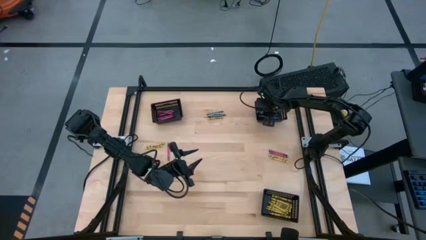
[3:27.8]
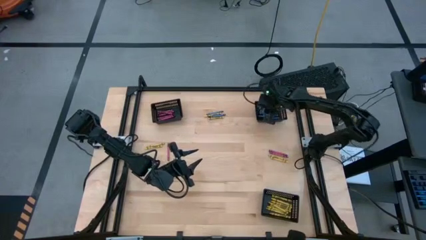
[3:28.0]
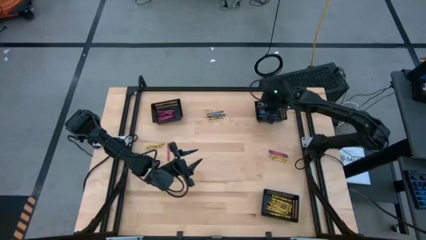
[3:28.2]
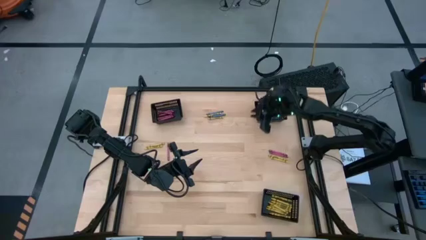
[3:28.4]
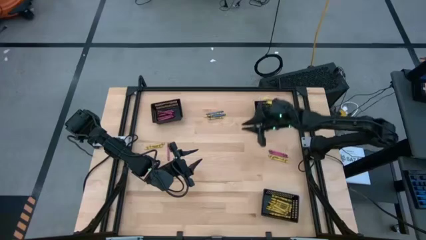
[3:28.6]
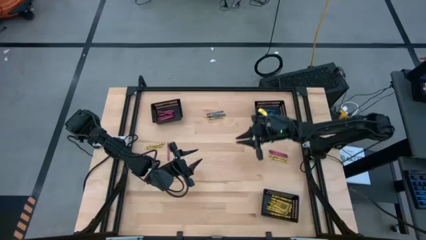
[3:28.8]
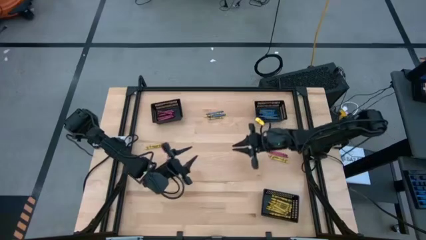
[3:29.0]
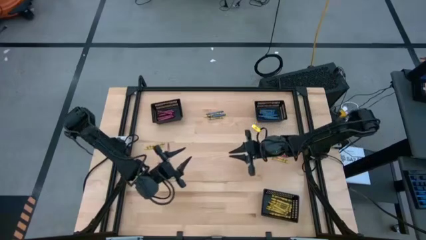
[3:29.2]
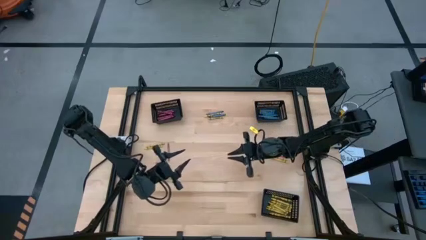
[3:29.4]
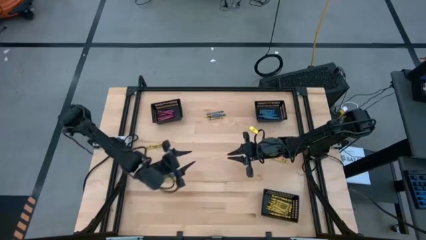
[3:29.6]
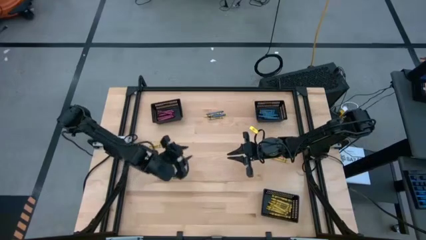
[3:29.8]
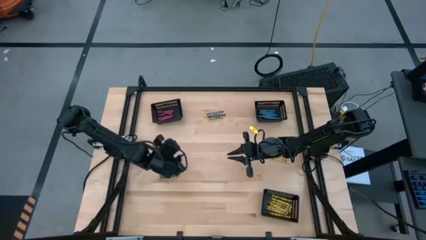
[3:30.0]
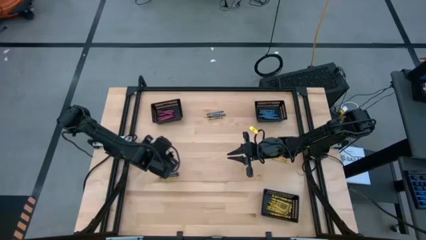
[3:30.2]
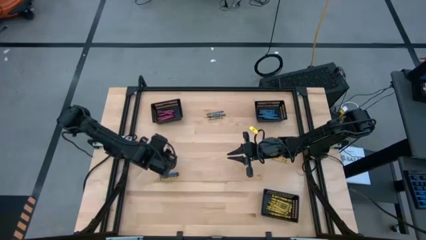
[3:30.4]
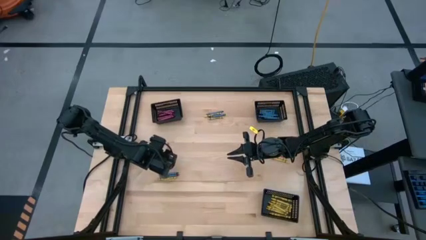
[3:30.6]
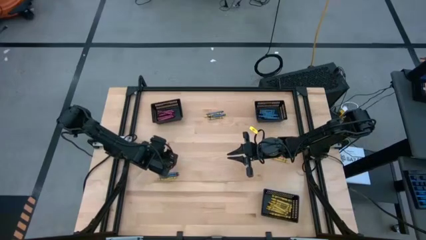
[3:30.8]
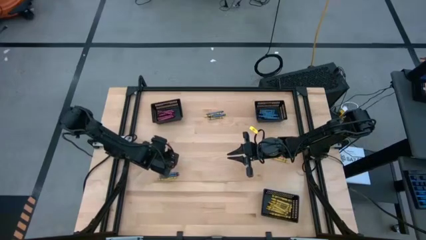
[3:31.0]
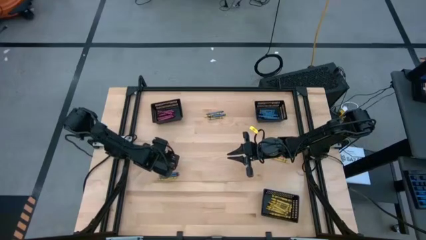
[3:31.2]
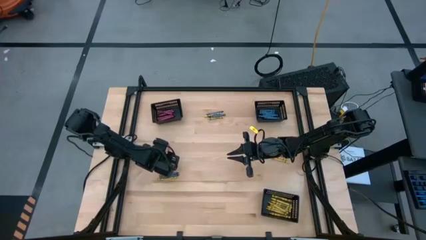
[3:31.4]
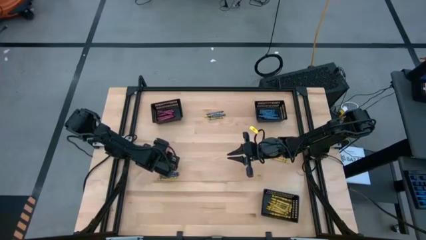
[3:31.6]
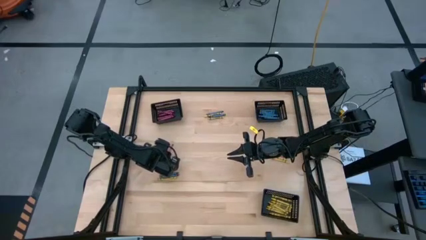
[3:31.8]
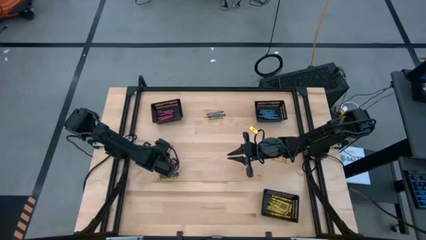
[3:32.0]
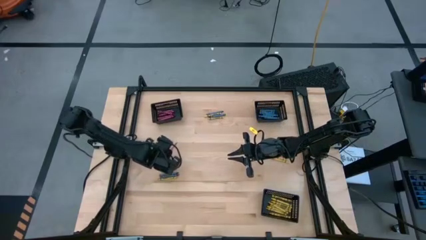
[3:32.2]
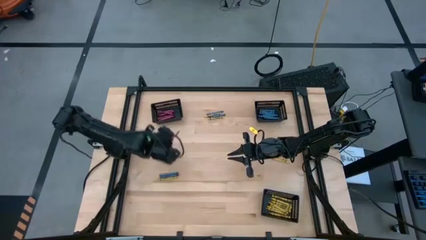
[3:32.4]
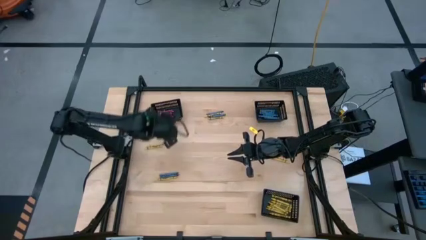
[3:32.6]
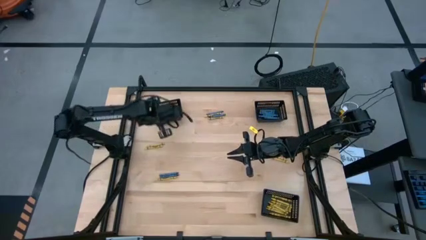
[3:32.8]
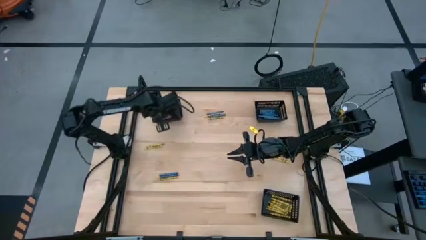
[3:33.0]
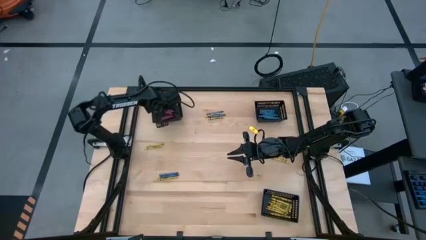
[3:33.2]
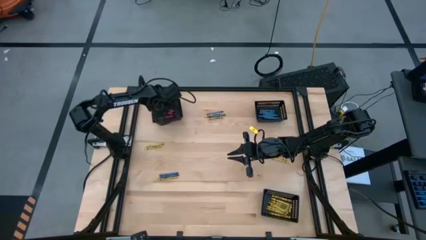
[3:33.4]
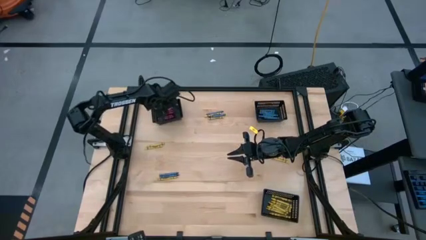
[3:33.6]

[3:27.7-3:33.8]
Task: Sort crayons
Put the red crayon into the top left black bin

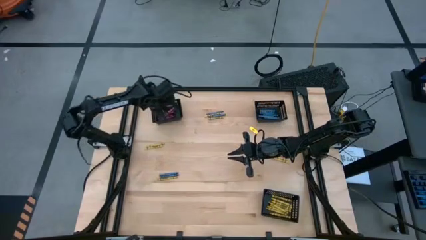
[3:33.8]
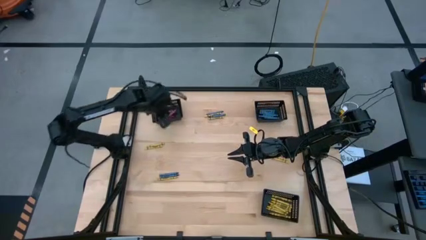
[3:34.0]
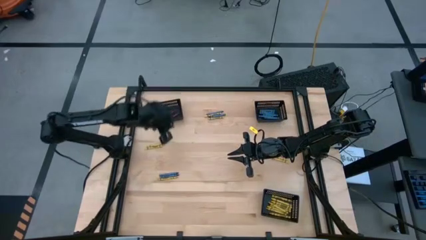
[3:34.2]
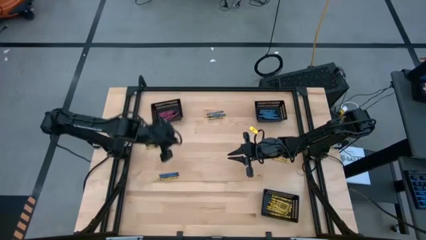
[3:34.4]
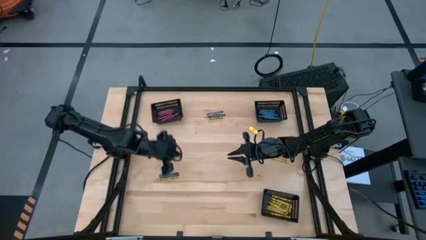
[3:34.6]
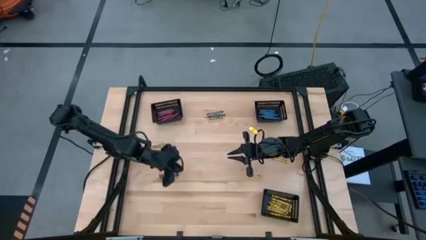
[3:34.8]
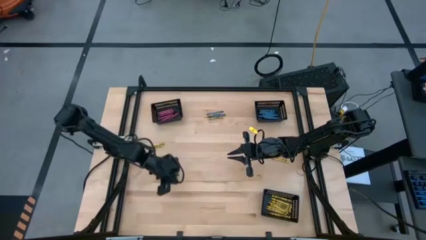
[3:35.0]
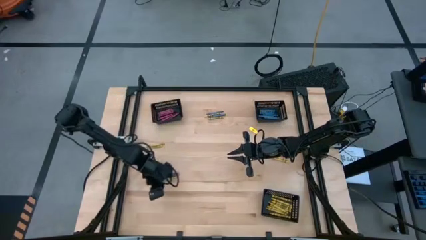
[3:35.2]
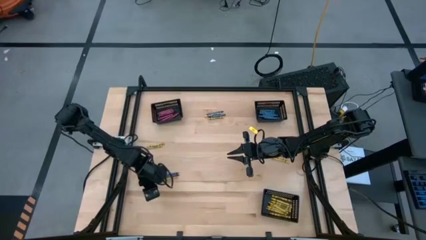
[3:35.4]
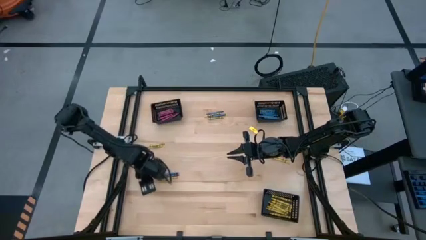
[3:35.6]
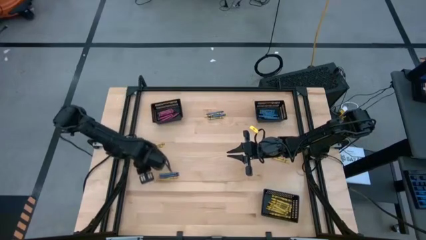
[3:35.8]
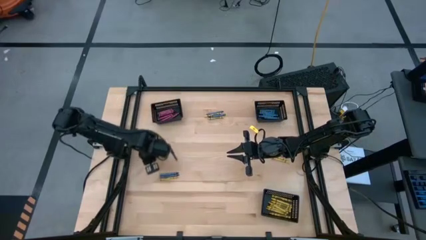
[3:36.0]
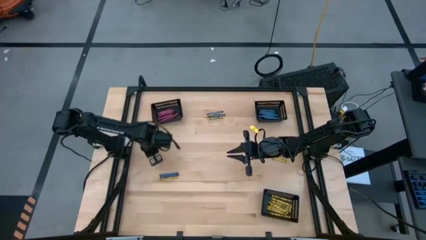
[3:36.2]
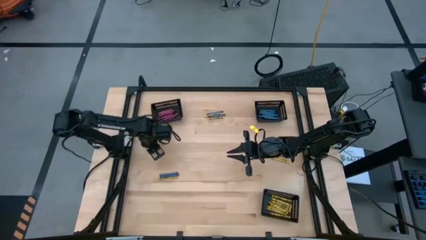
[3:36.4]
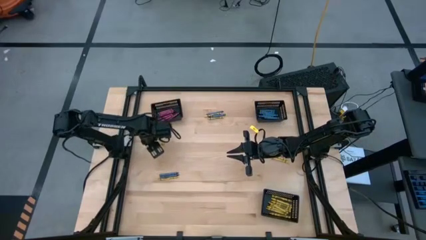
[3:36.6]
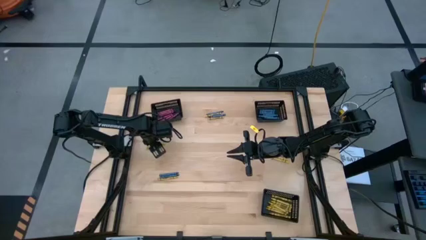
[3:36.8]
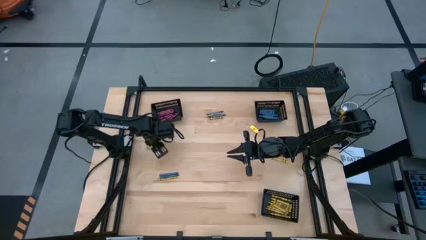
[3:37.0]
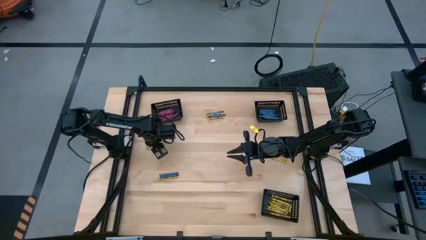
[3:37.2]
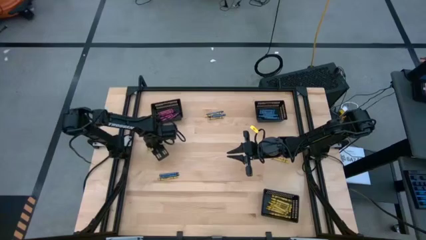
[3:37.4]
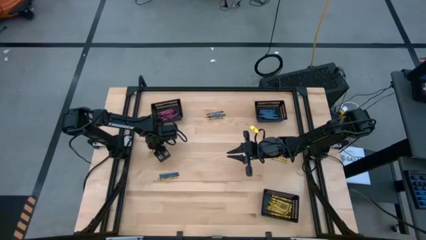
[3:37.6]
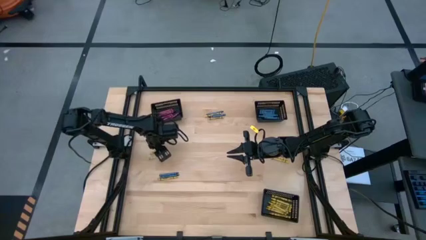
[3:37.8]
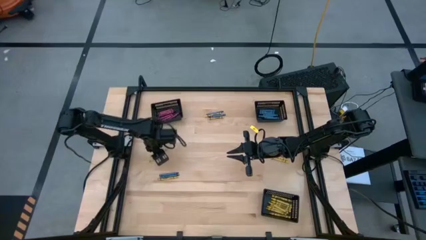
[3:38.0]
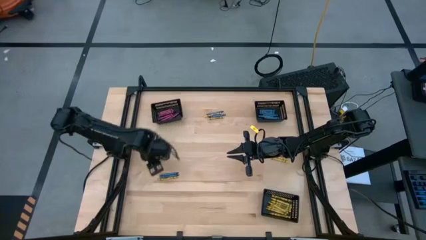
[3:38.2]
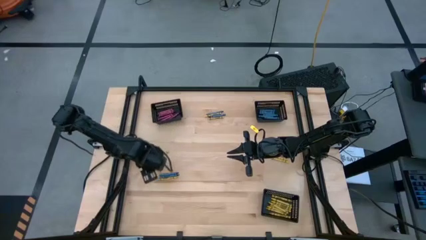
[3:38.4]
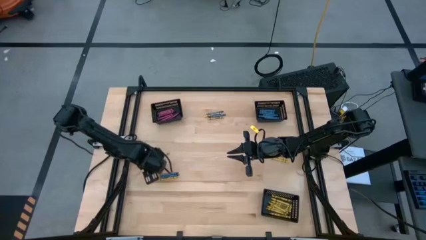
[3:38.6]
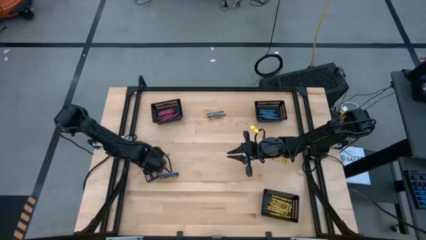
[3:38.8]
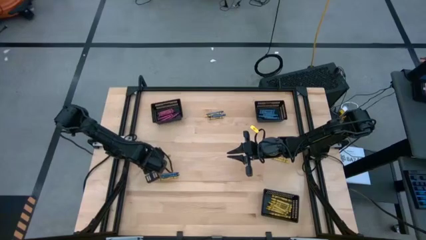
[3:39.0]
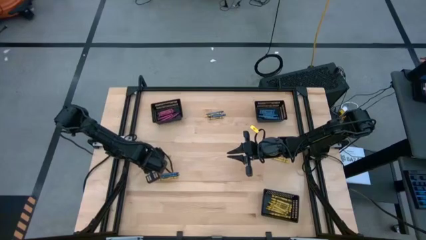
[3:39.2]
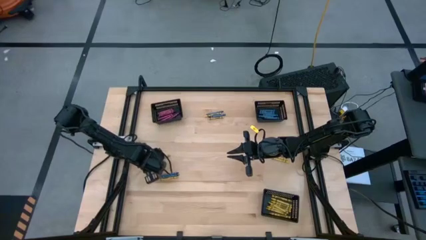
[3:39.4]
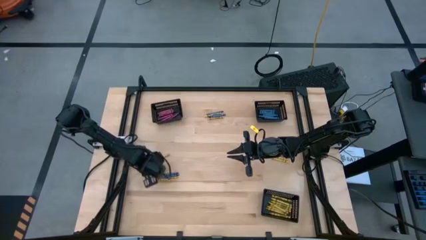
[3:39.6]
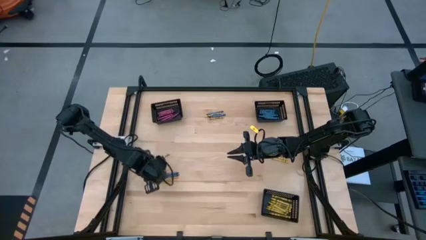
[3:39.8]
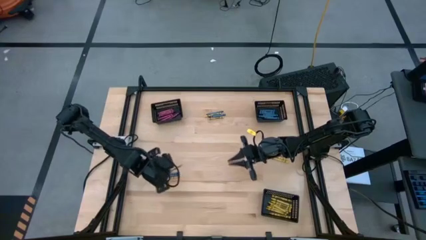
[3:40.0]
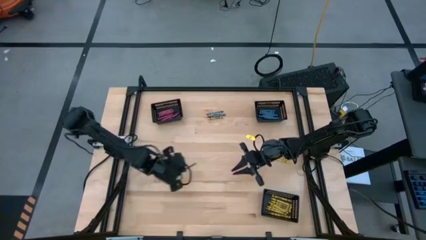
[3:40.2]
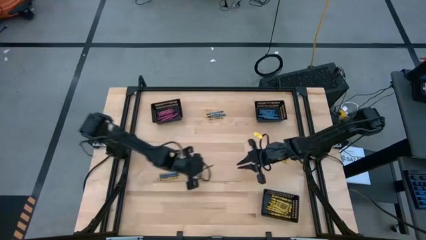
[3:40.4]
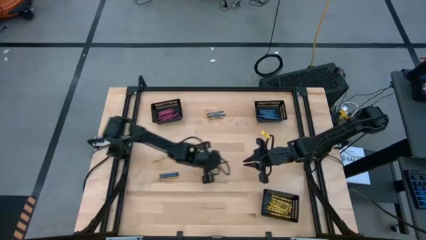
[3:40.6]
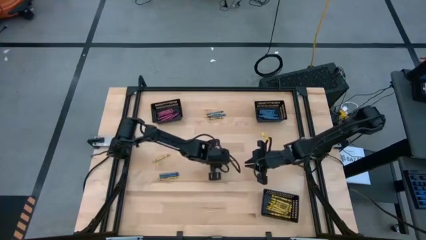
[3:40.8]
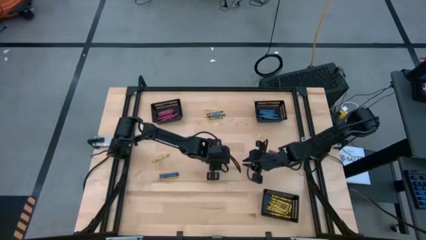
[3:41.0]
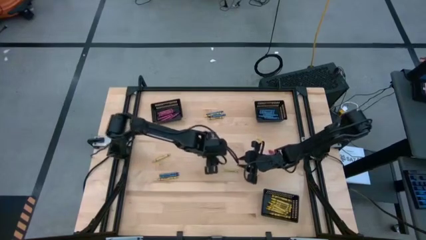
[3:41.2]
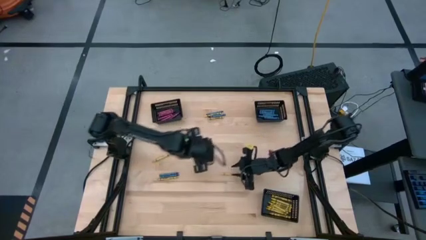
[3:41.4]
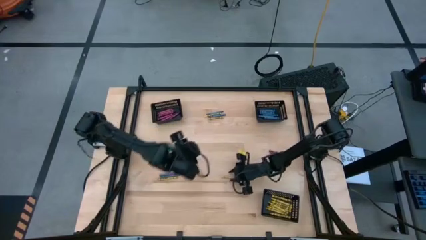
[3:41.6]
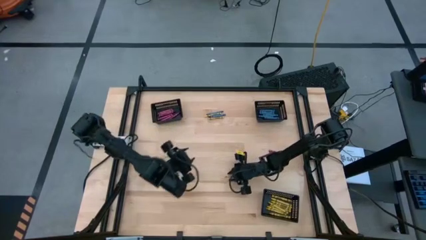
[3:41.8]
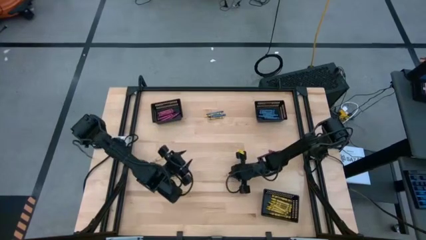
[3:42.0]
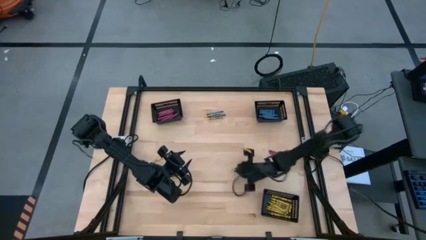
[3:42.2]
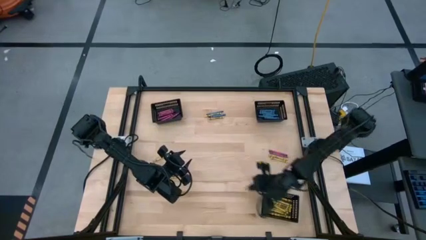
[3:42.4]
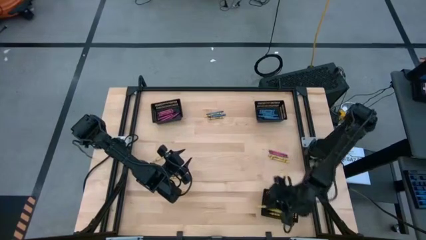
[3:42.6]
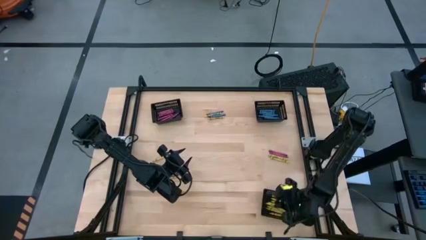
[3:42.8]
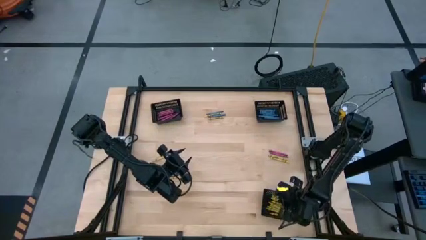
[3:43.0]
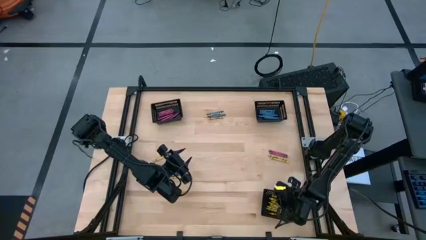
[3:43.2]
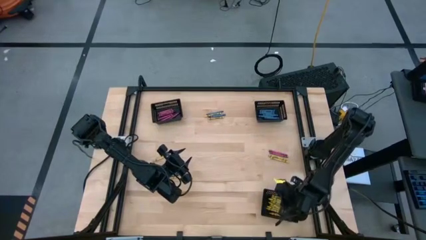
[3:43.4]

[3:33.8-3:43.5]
Put the yellow crayon into the bottom black bin
